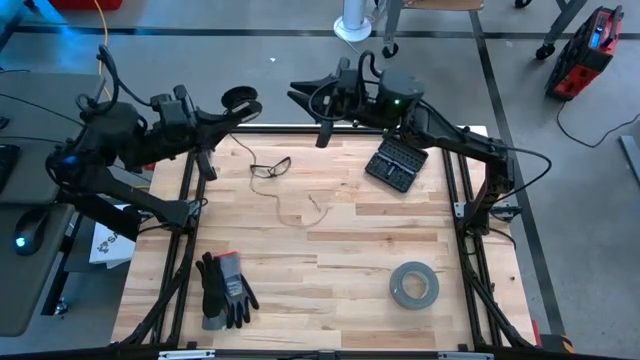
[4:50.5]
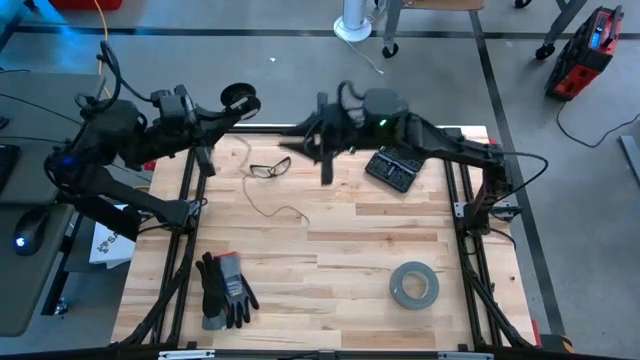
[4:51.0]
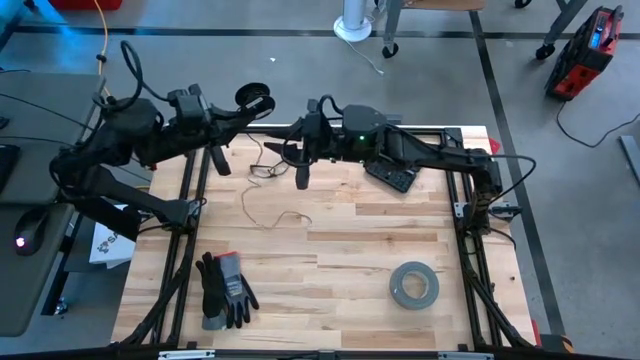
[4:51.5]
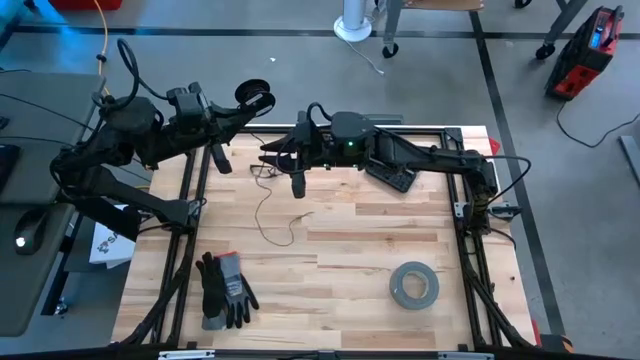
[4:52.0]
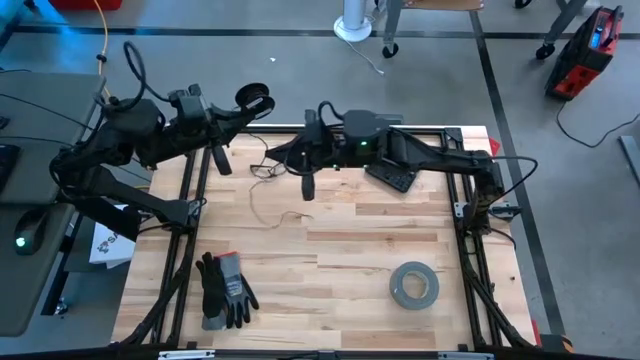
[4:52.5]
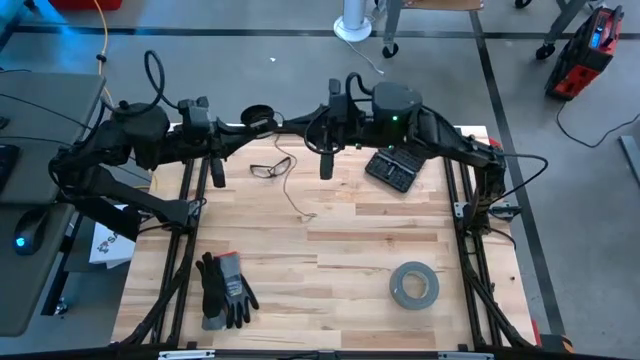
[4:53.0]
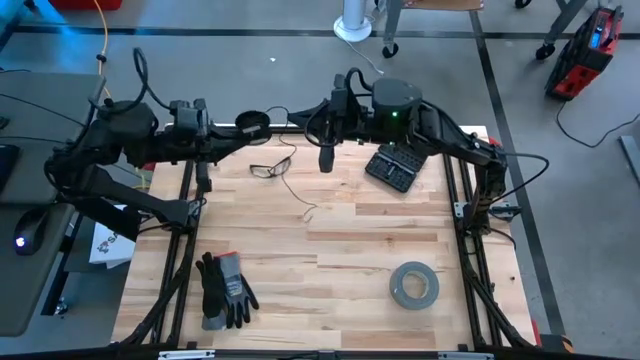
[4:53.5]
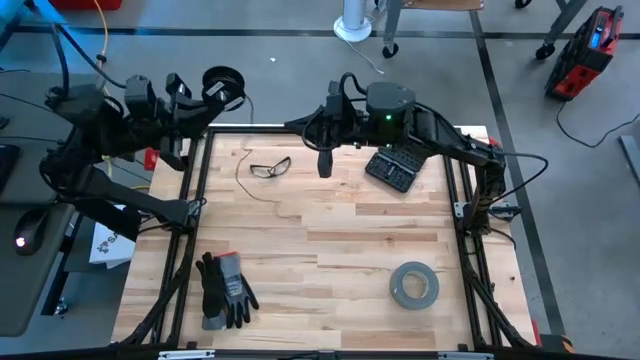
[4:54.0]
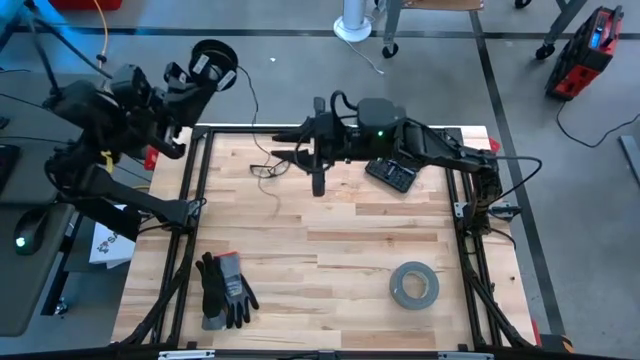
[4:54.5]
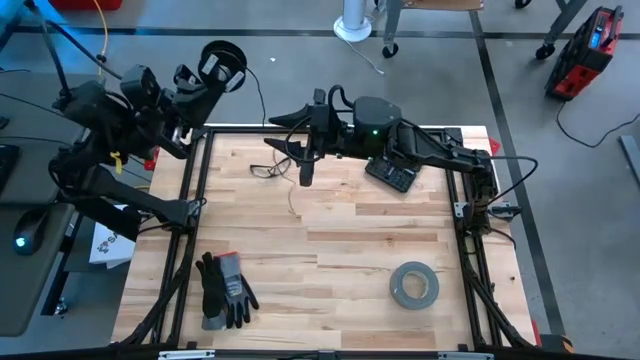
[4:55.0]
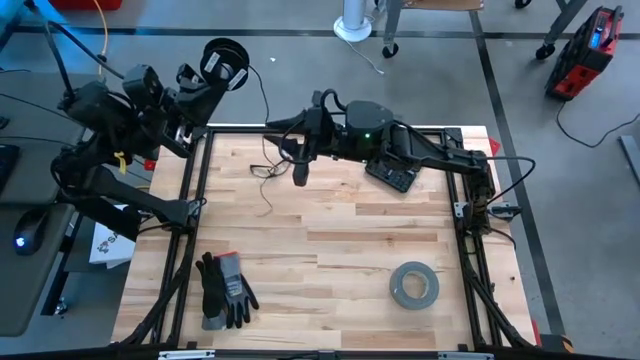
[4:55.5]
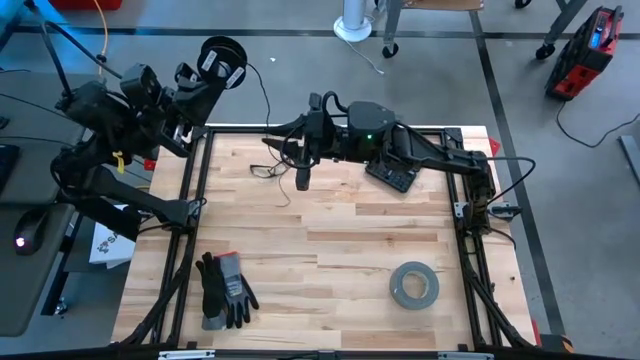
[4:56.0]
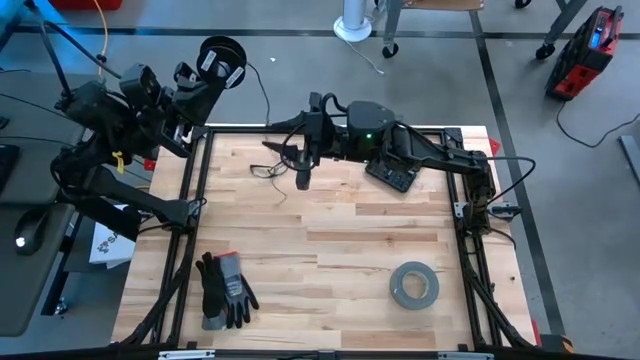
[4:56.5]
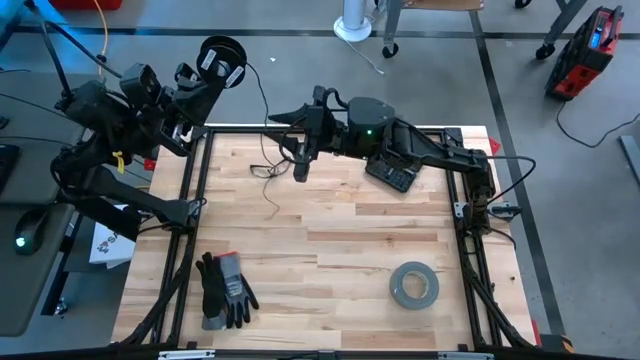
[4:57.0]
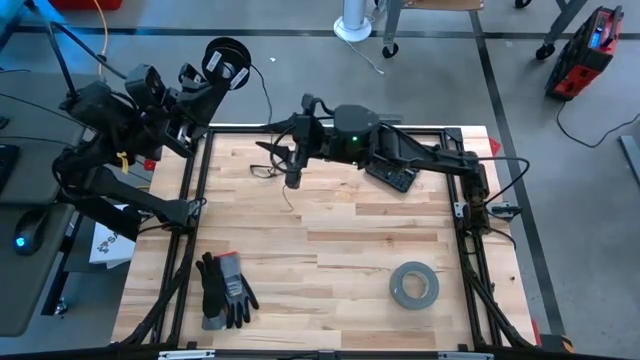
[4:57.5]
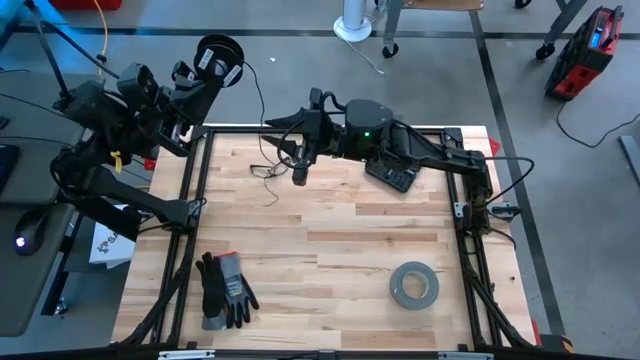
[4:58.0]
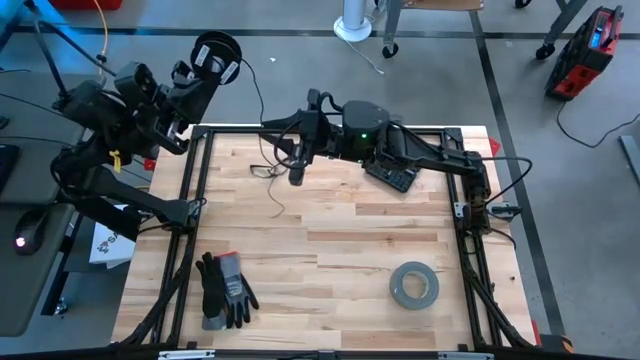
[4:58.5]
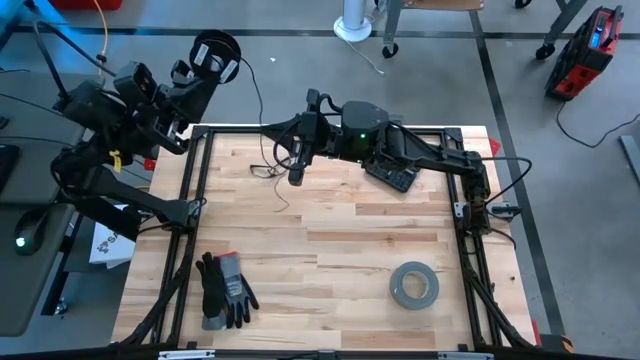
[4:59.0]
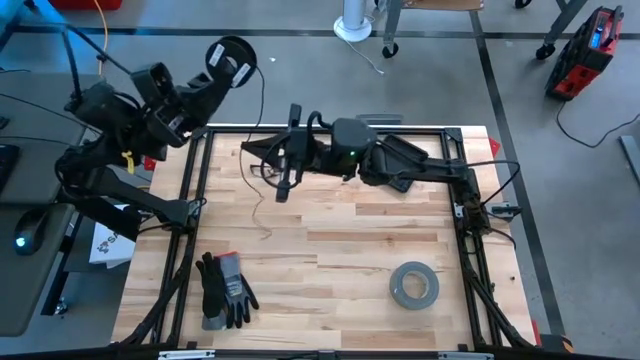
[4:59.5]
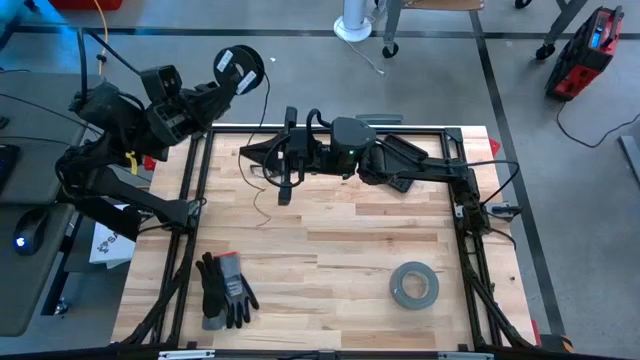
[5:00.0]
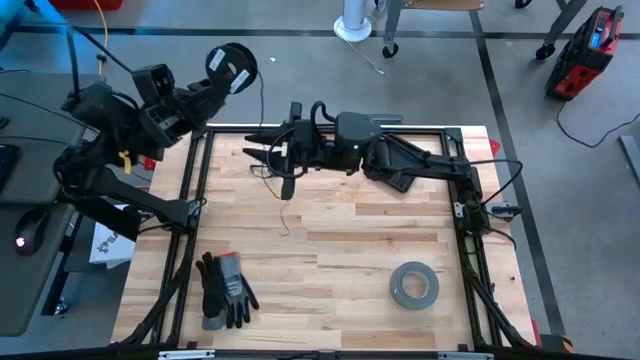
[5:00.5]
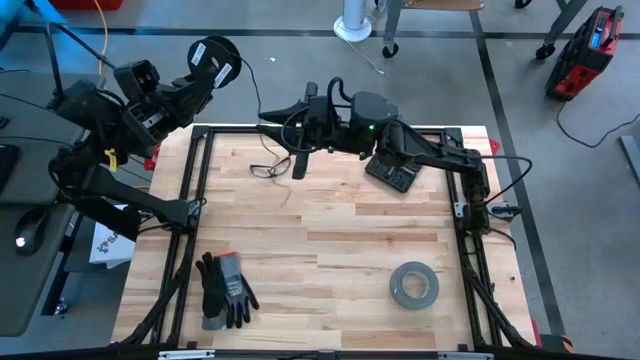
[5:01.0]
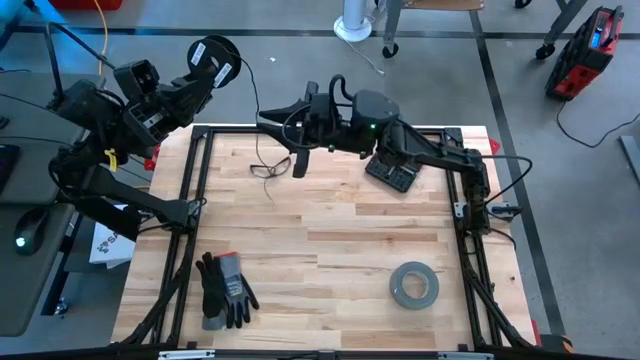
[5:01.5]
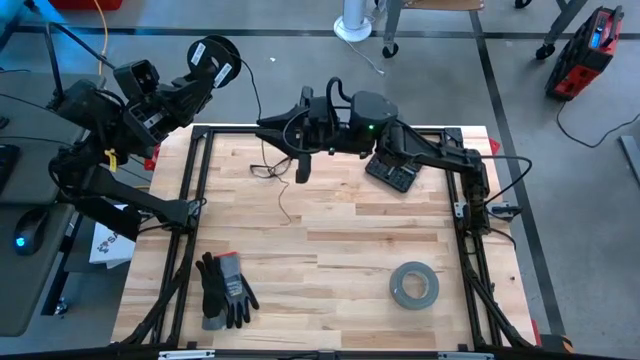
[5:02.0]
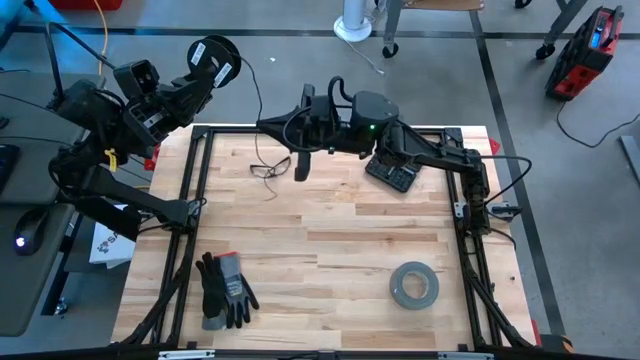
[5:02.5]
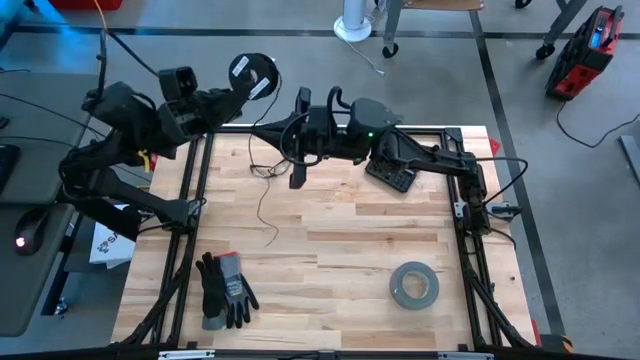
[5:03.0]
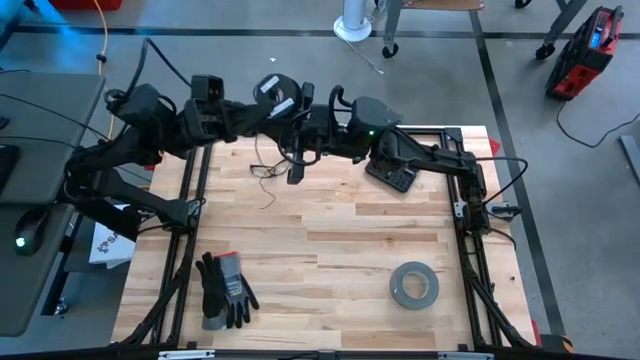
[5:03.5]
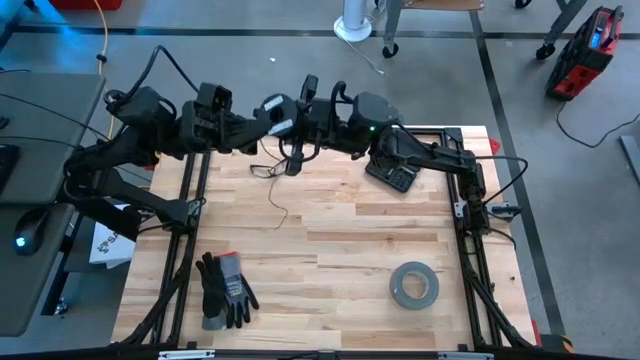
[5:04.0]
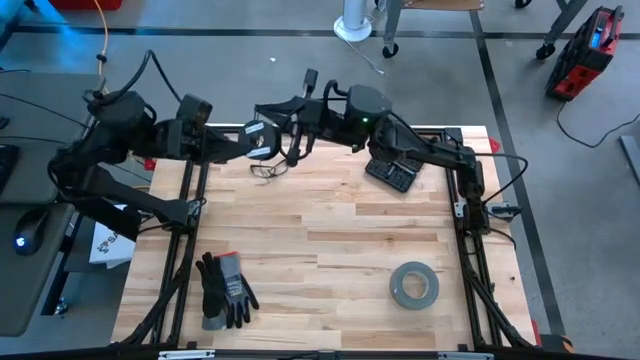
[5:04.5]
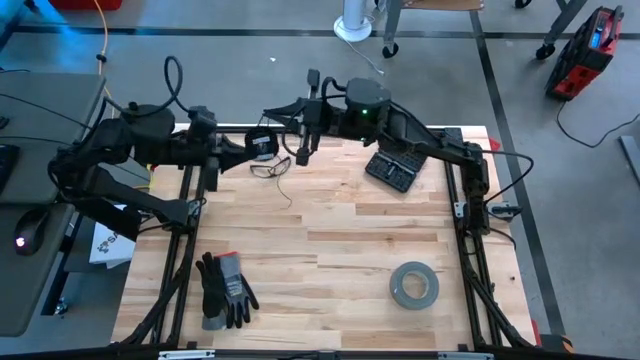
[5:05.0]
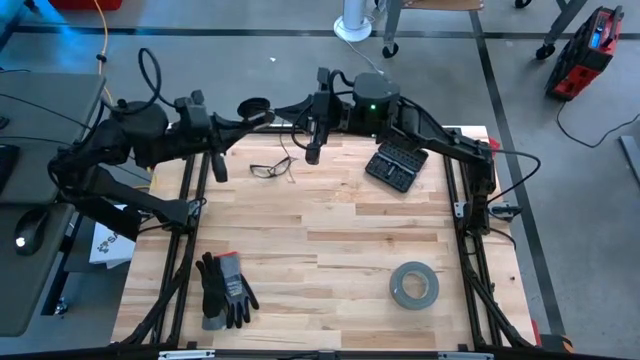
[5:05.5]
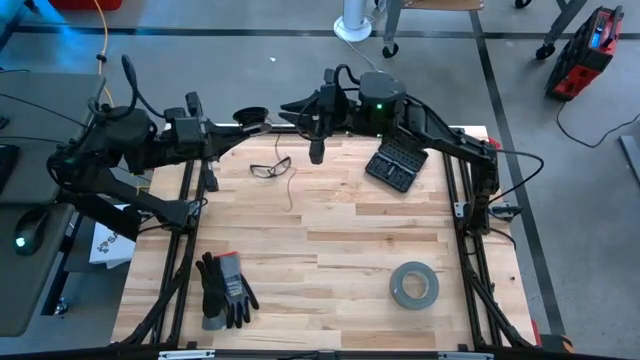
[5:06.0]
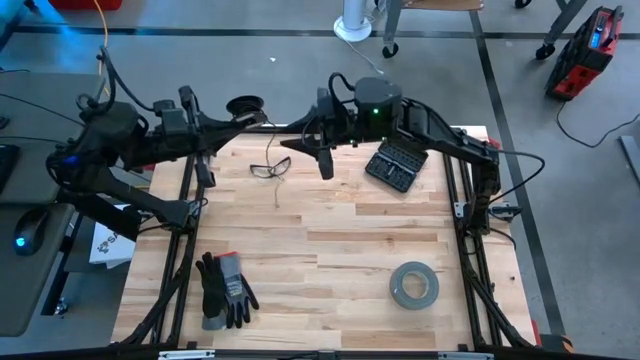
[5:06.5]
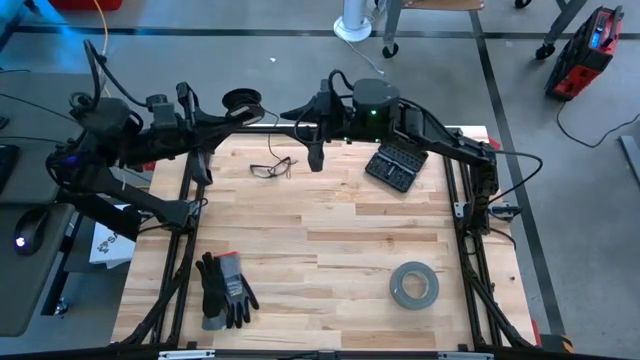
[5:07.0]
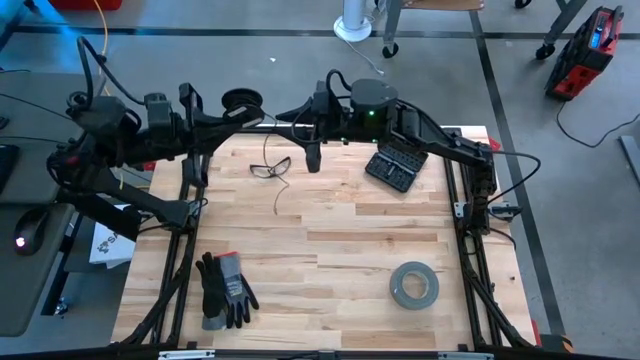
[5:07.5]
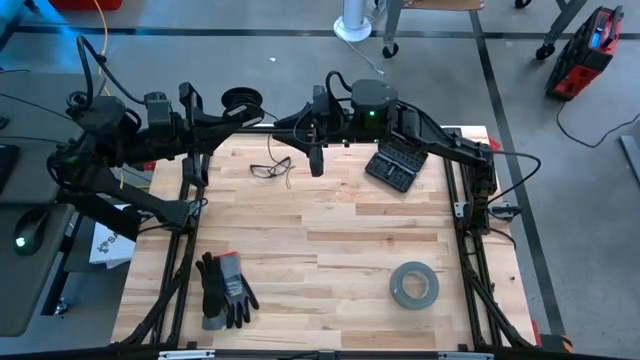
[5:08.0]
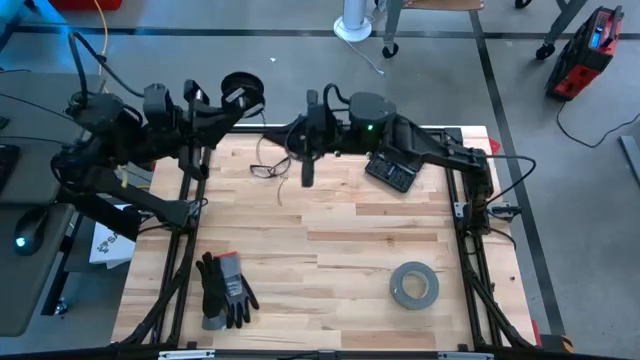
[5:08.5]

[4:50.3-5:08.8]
Task: Coil cords
Coil the black wire on the black spool
